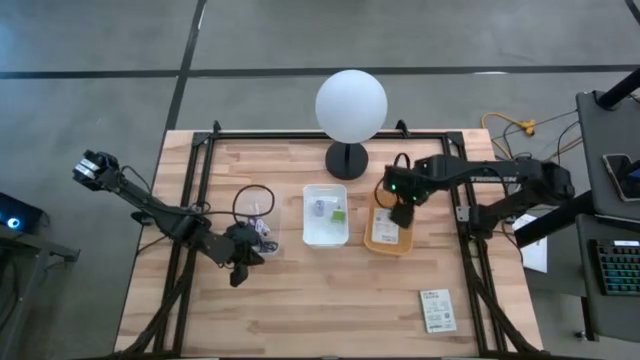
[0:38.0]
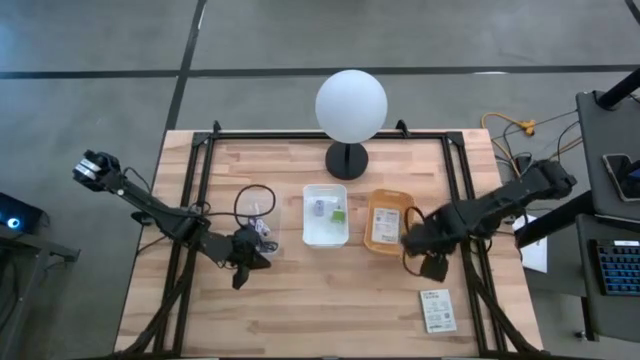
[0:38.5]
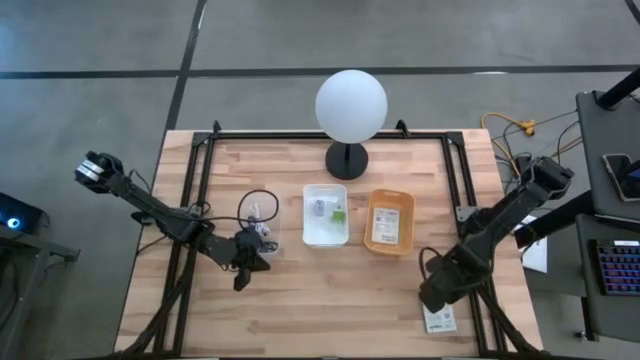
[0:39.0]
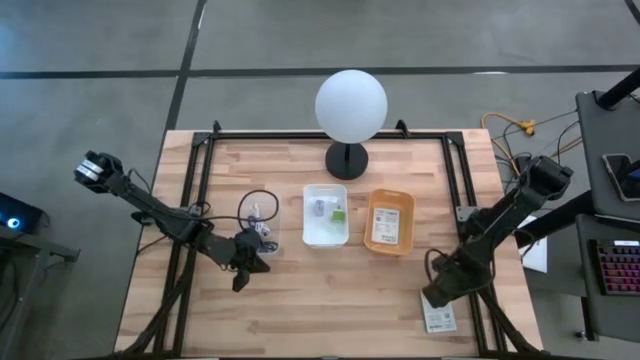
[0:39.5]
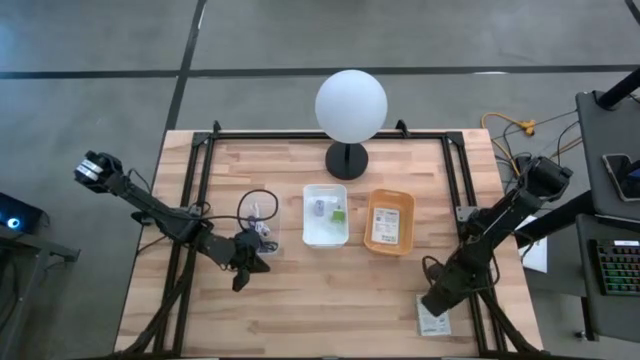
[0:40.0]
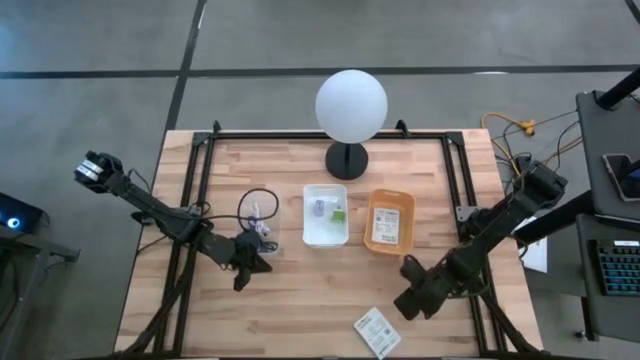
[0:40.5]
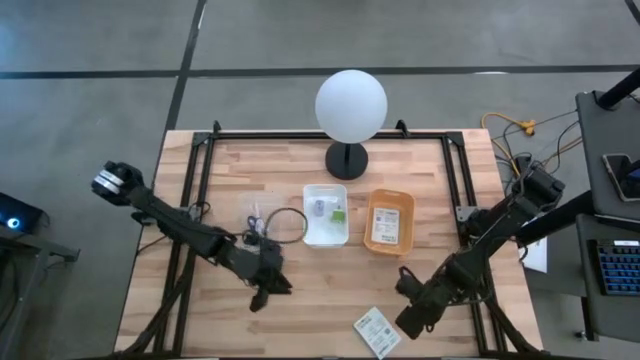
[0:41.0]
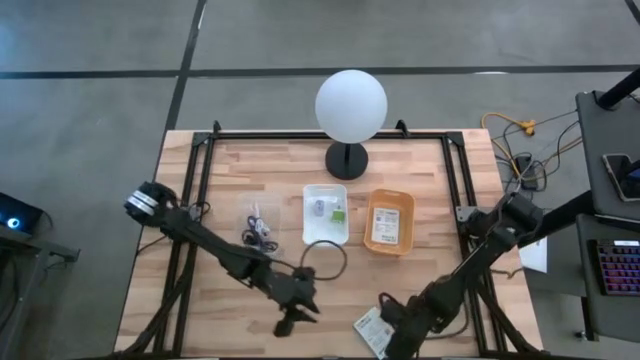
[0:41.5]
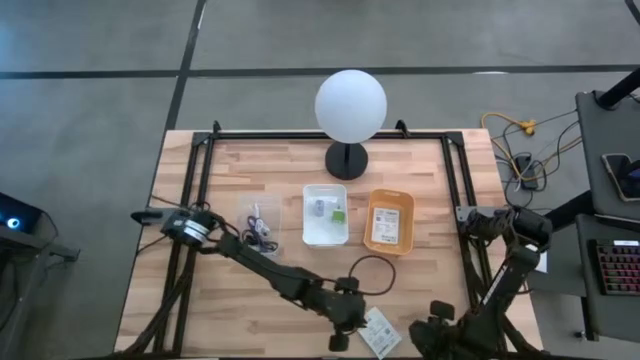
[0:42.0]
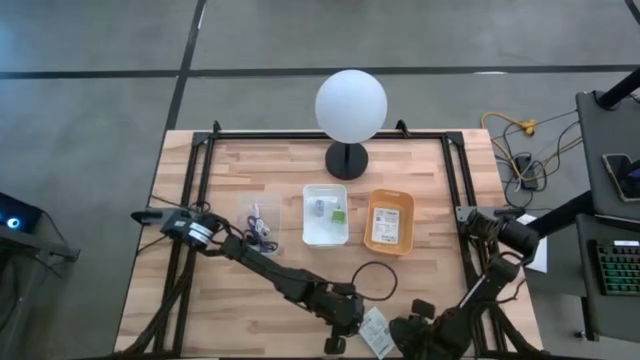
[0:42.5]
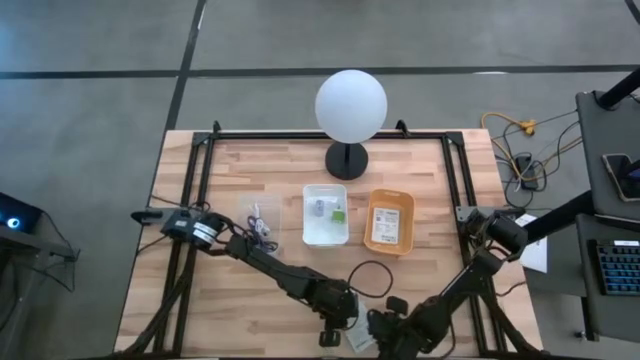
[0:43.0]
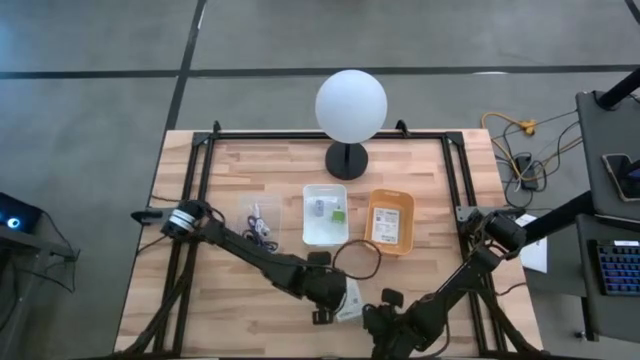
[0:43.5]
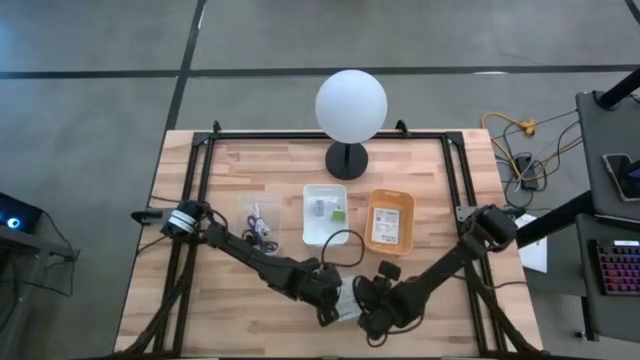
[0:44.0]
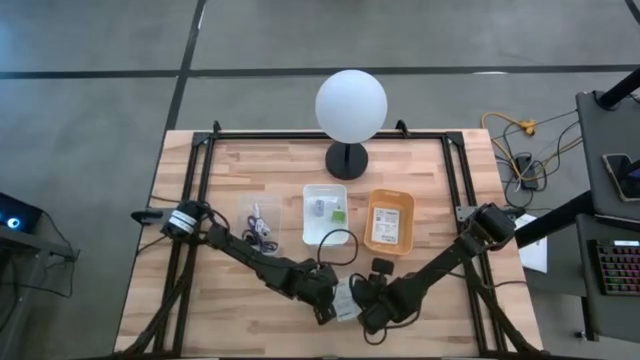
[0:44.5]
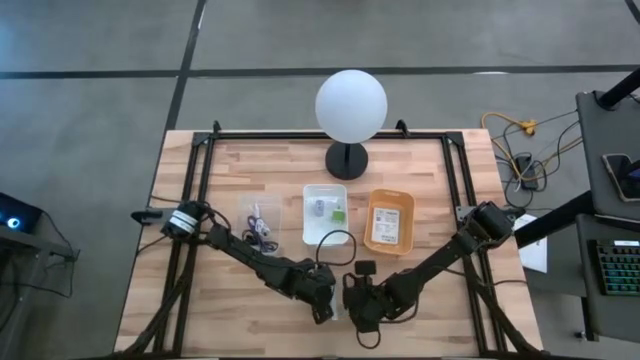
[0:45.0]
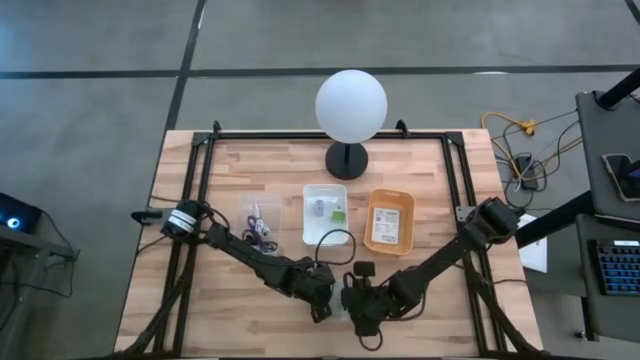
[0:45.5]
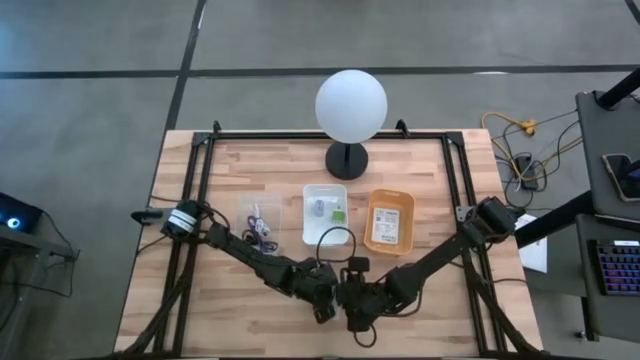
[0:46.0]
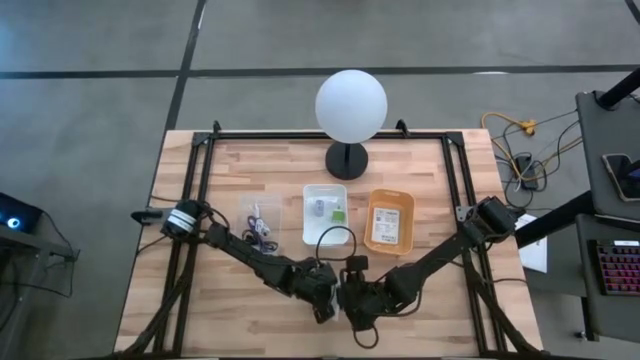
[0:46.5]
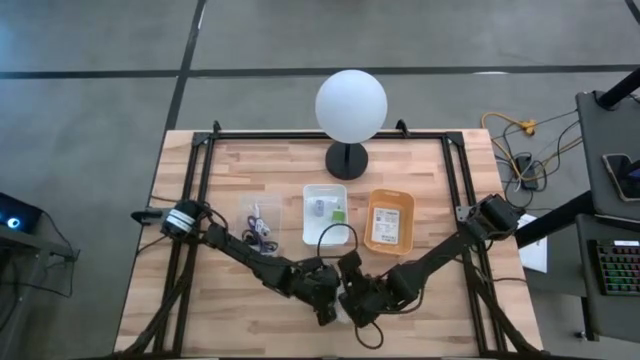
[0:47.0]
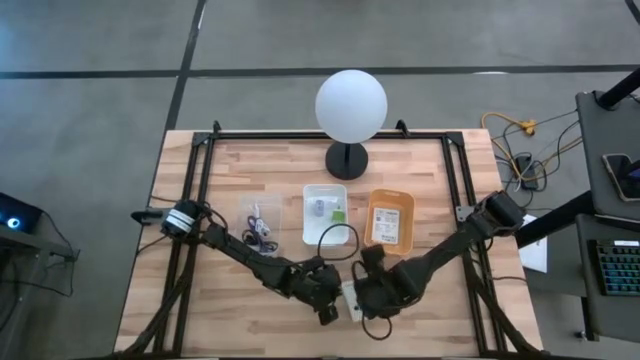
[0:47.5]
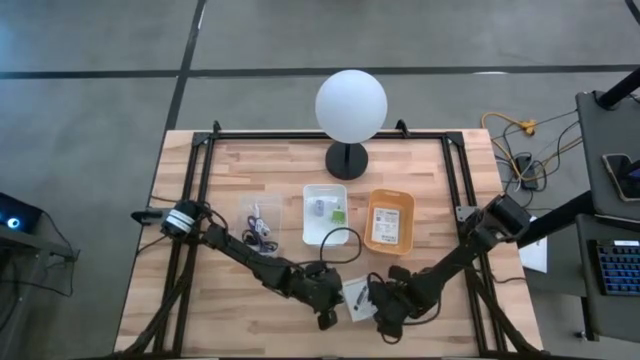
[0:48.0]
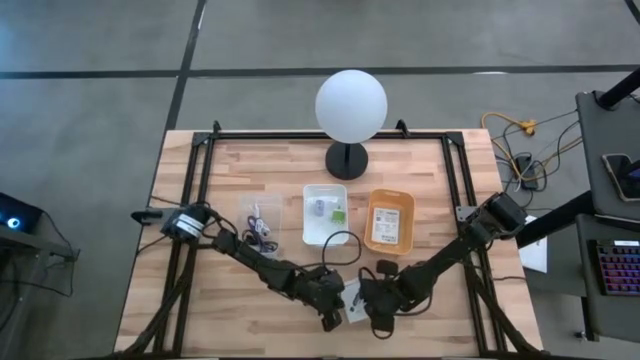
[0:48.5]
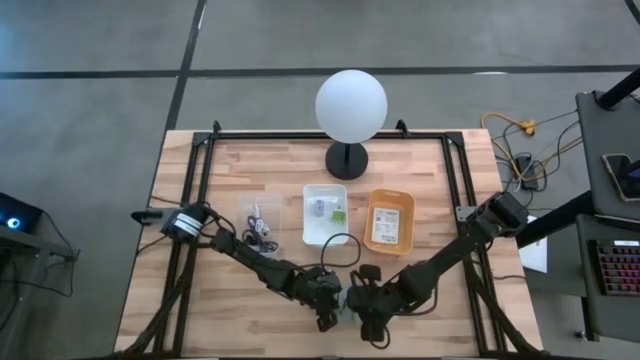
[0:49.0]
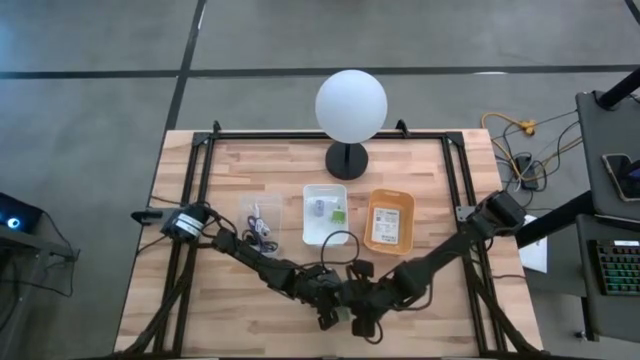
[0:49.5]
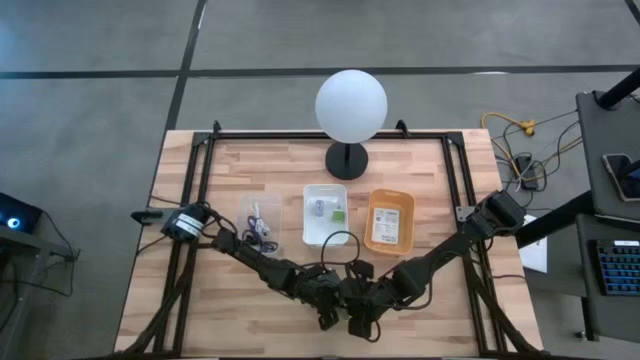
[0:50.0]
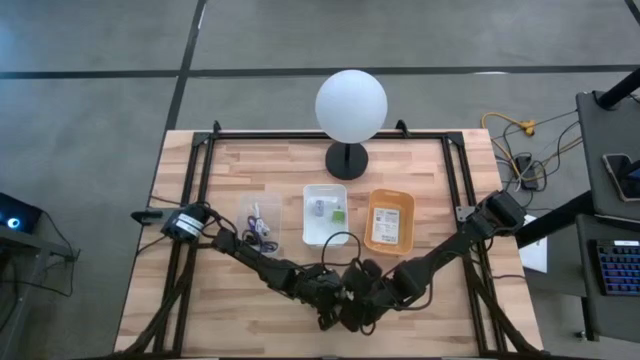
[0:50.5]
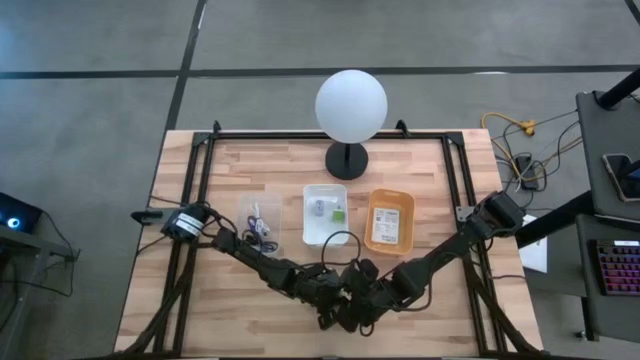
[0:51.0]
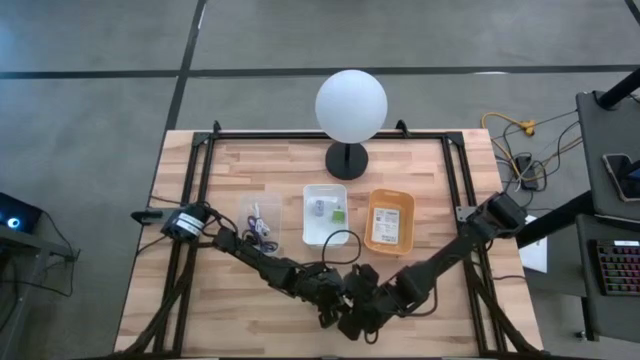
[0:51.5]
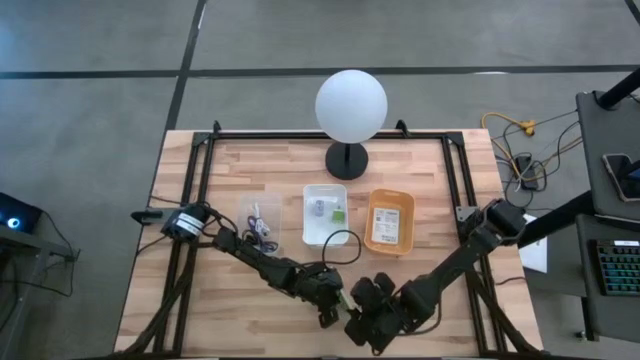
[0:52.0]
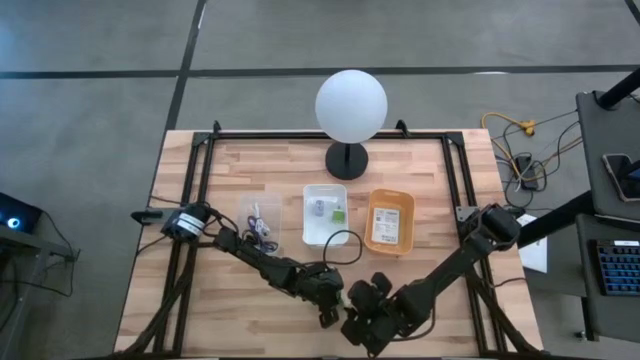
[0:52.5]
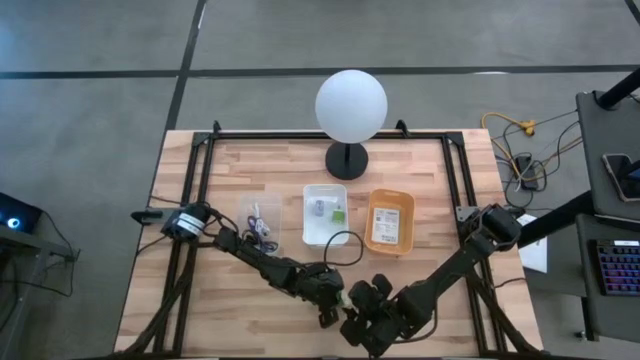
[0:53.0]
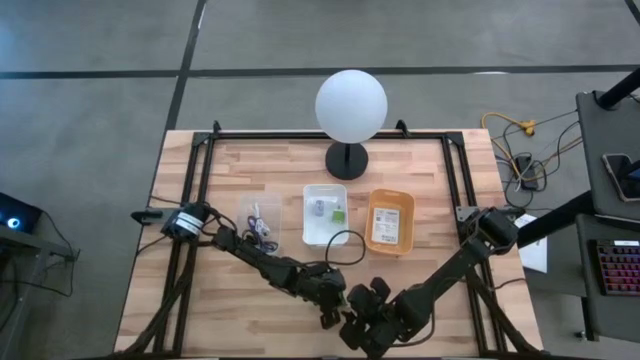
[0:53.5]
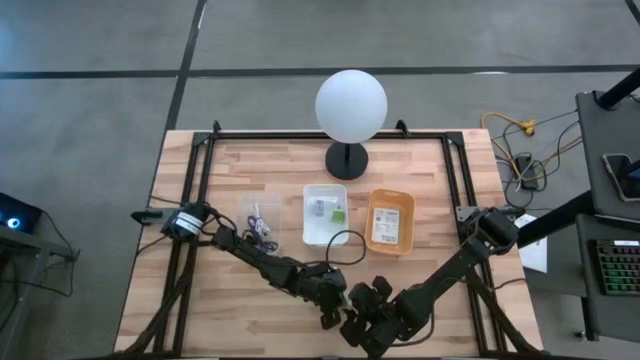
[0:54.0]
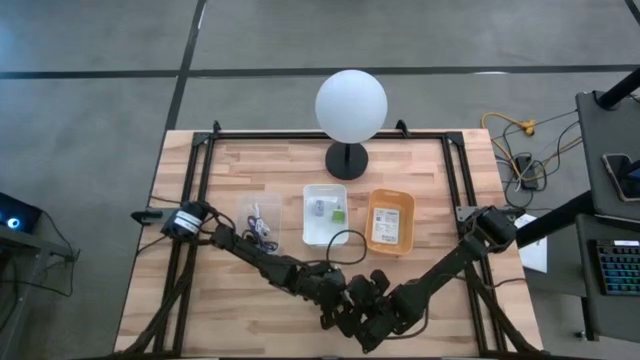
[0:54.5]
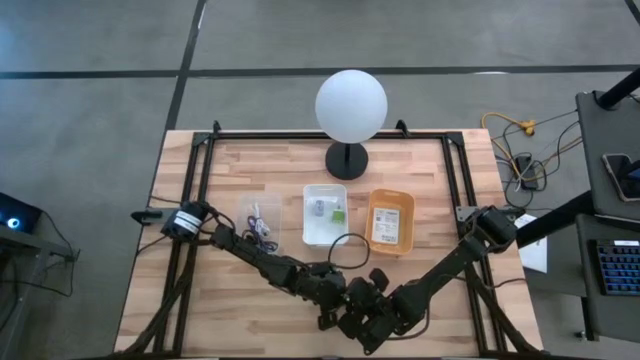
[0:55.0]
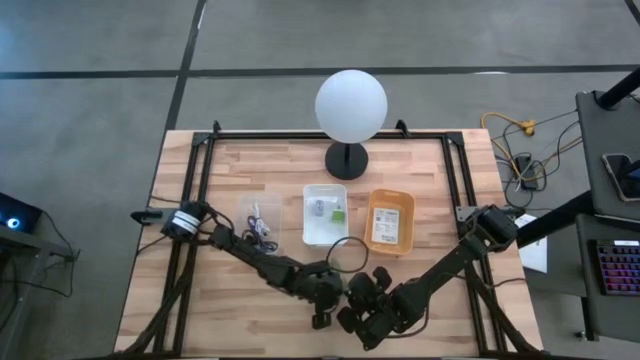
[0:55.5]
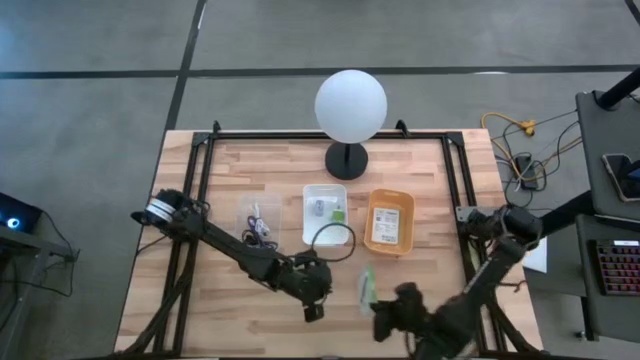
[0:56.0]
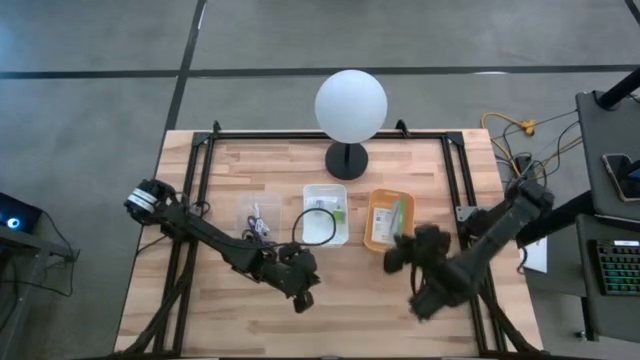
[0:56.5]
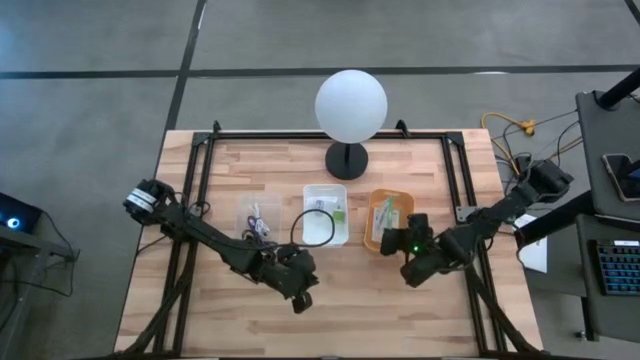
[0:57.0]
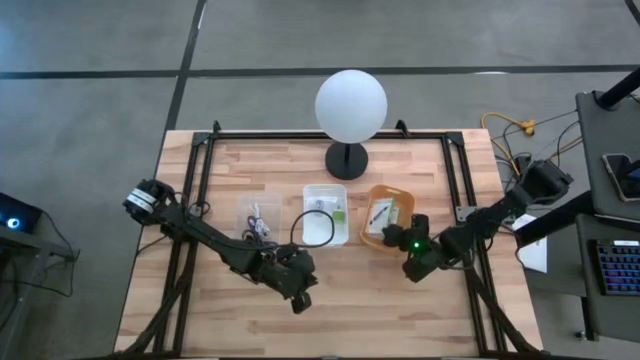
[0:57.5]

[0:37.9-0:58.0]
Task: Pick and place items into bin
Put the white card reader box into the yellow bin

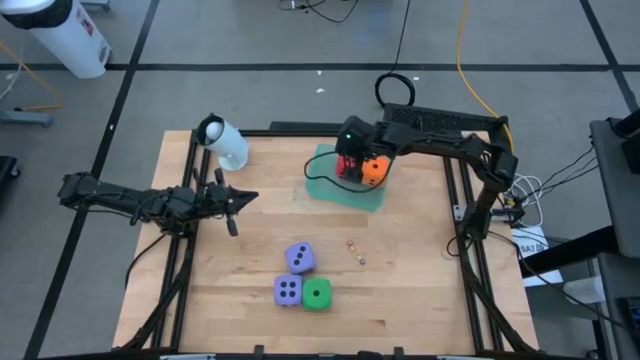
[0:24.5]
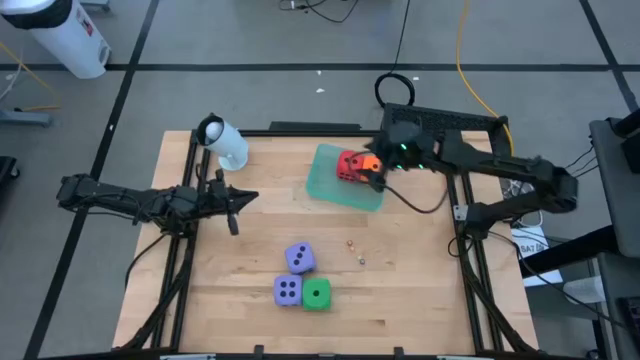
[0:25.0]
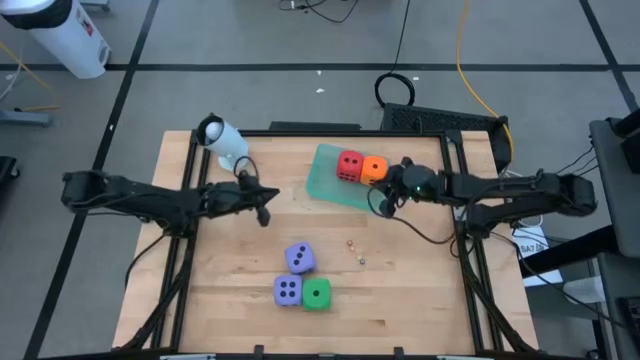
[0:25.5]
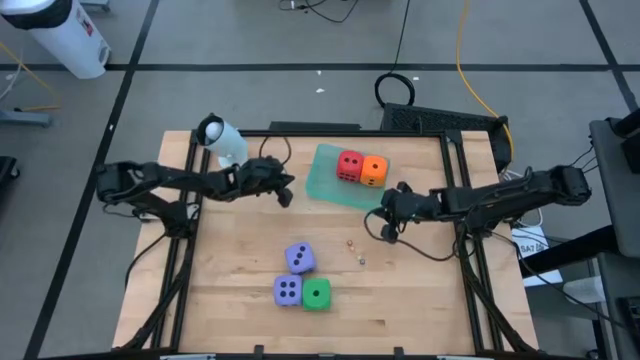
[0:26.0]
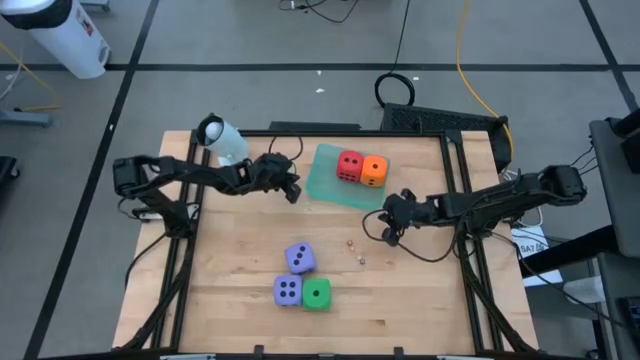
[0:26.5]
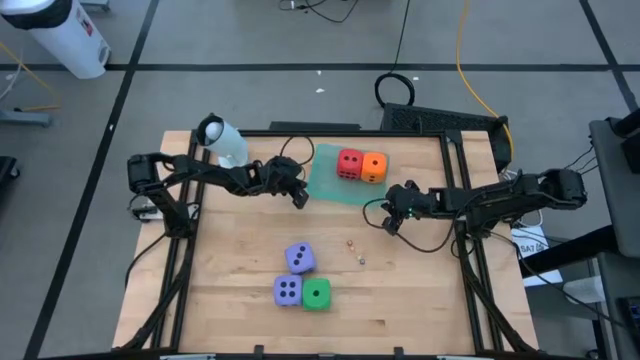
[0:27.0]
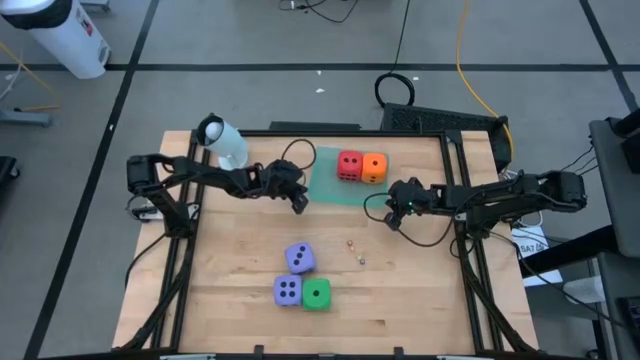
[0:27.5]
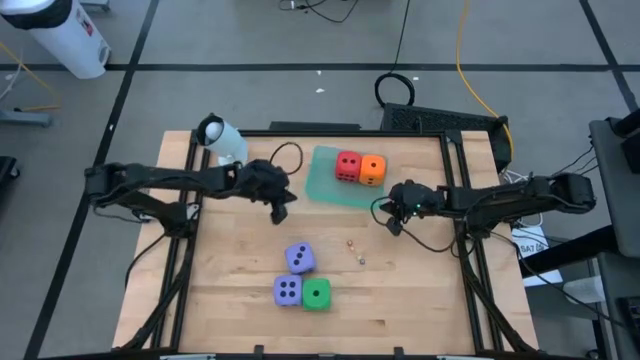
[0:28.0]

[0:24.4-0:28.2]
Task: Pick & Place Dice
Adjust the green bin on the table
